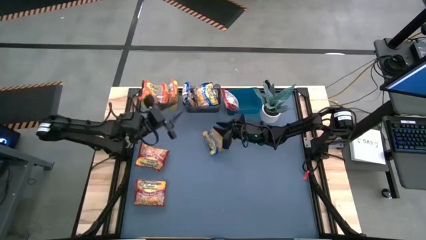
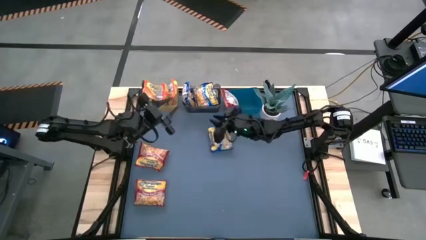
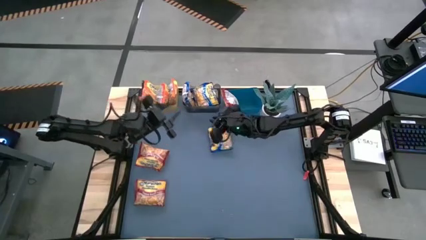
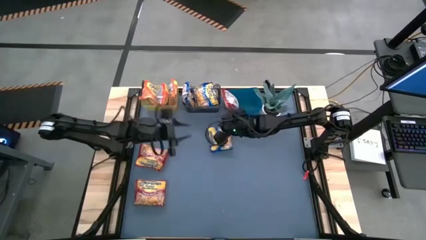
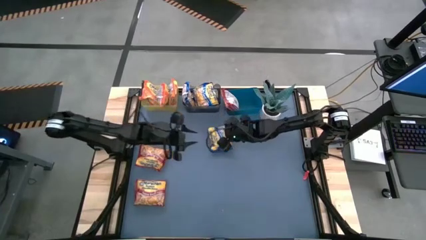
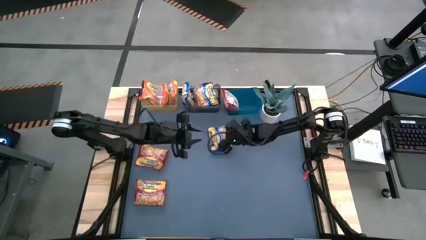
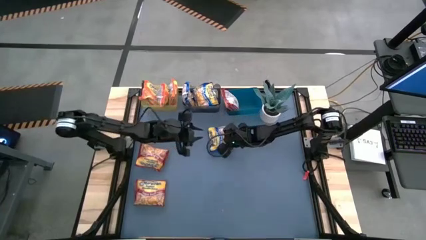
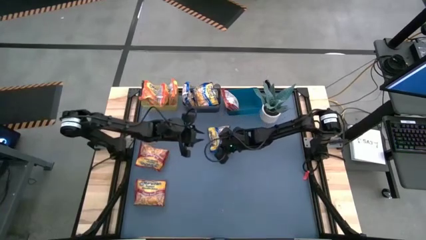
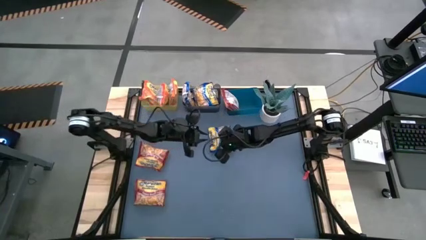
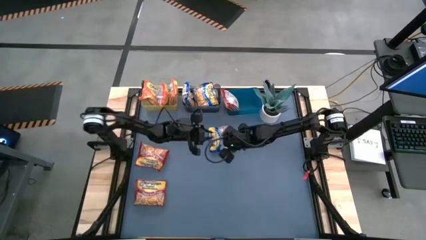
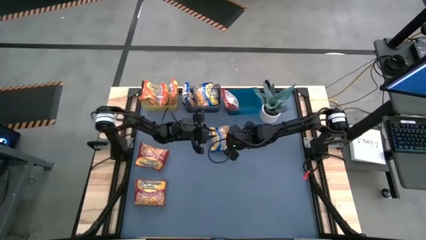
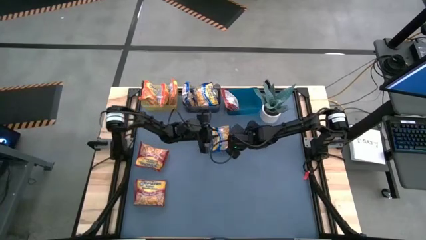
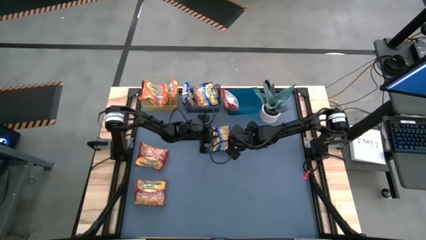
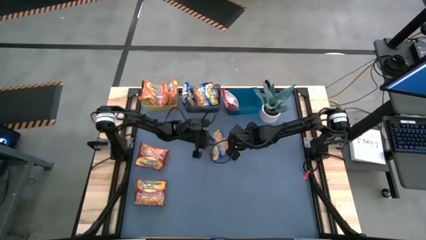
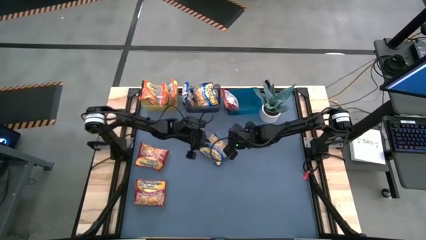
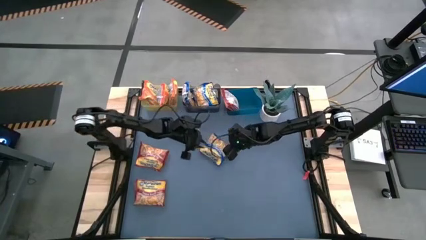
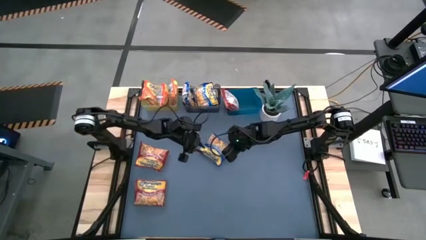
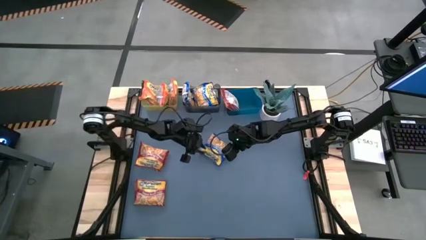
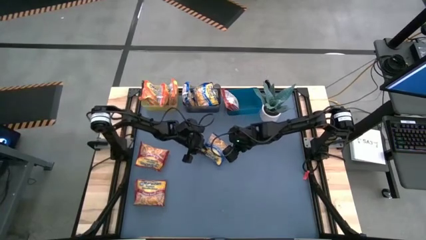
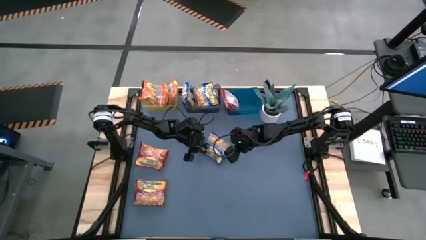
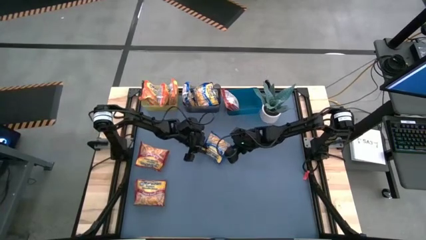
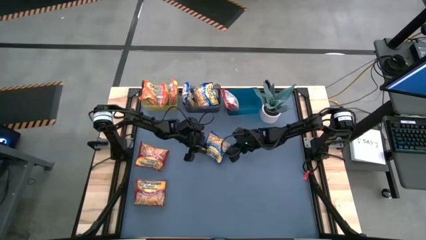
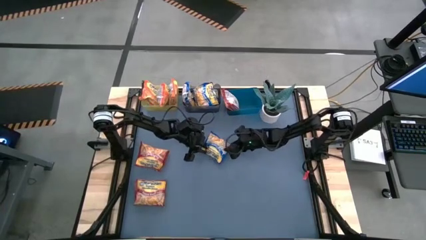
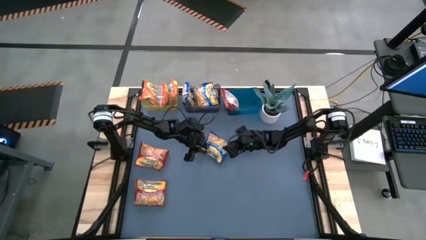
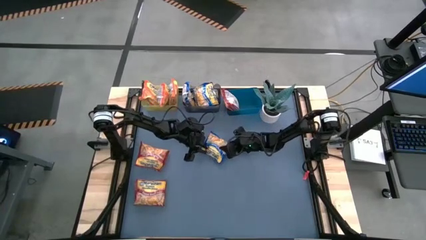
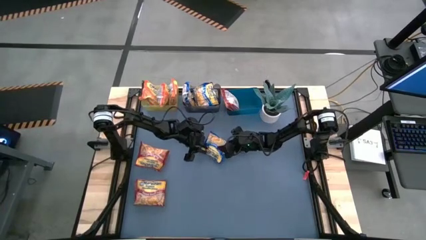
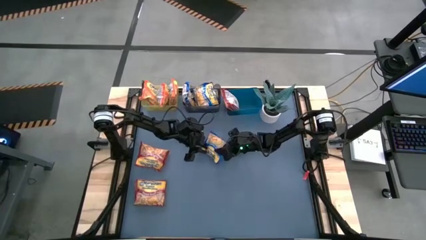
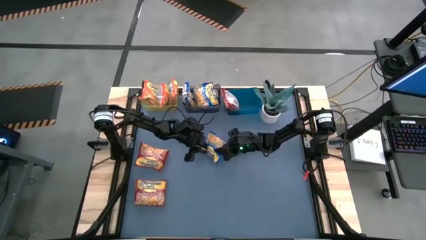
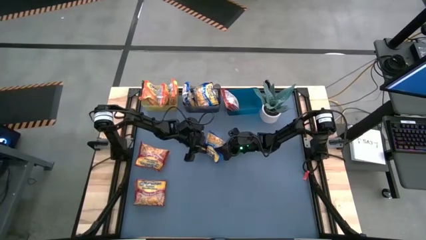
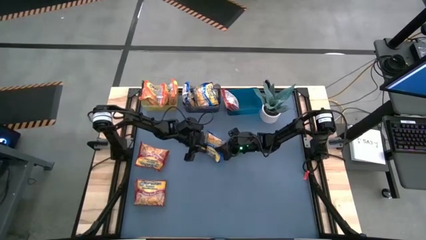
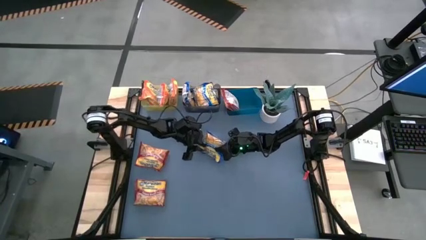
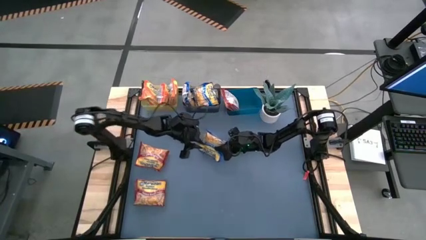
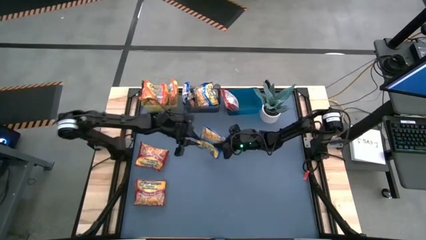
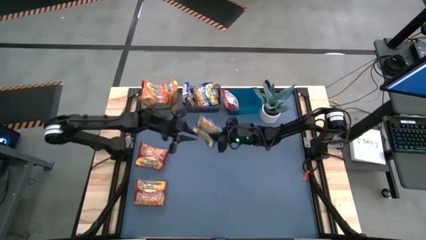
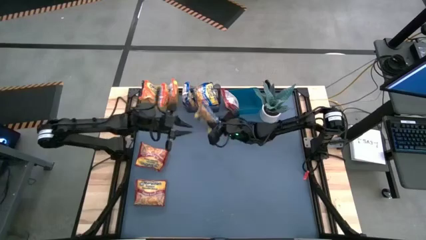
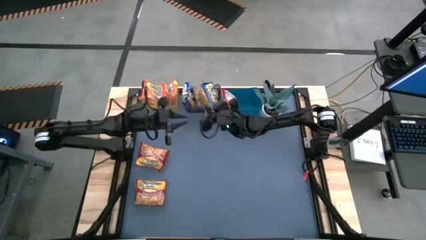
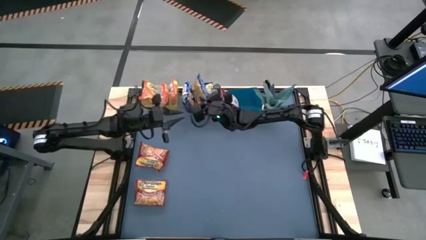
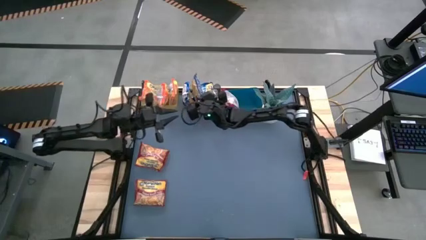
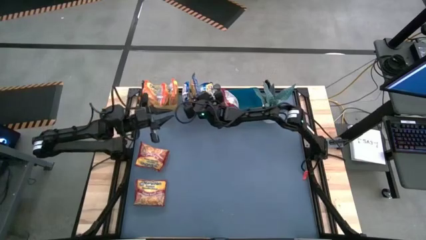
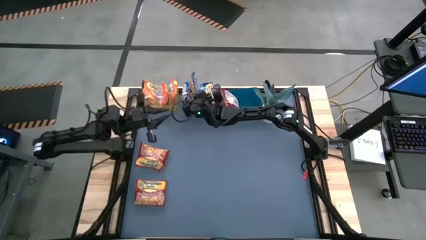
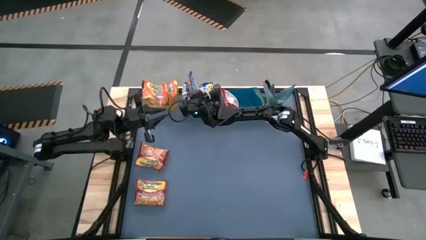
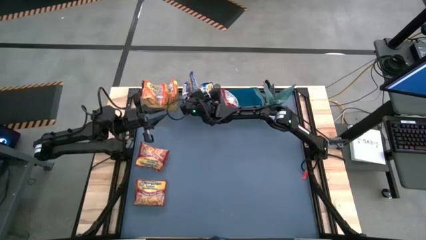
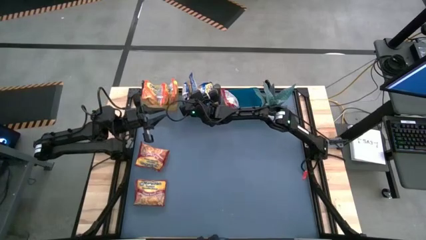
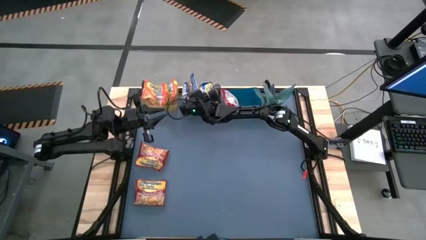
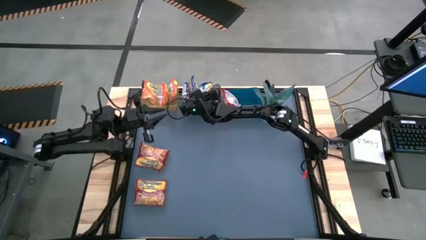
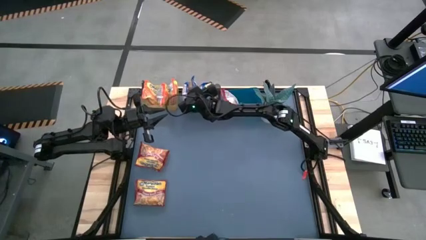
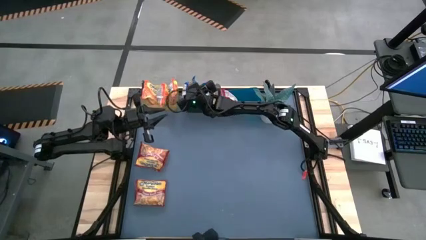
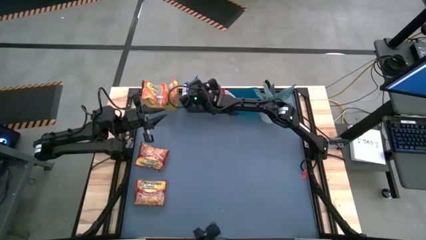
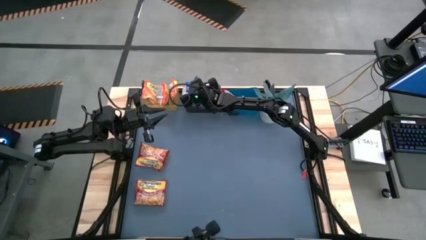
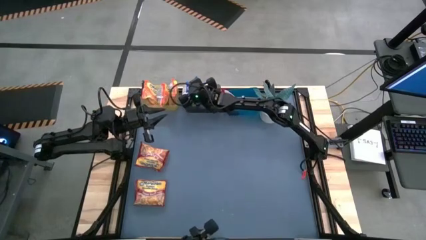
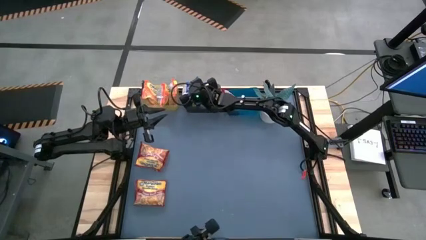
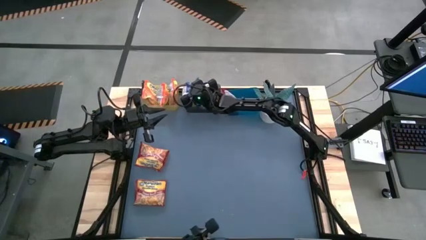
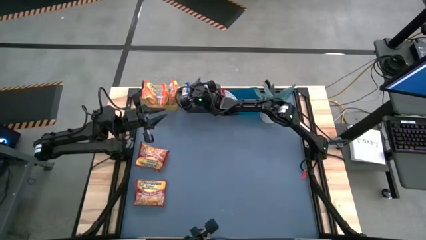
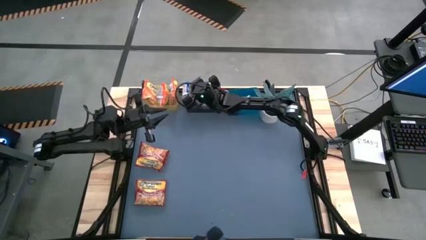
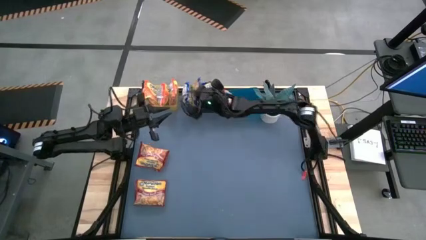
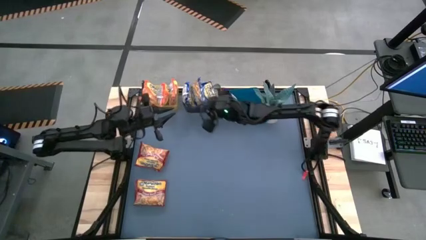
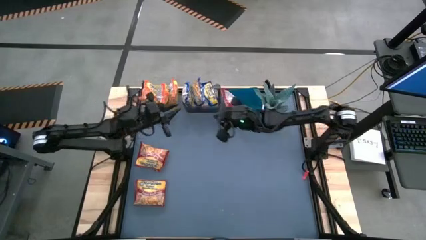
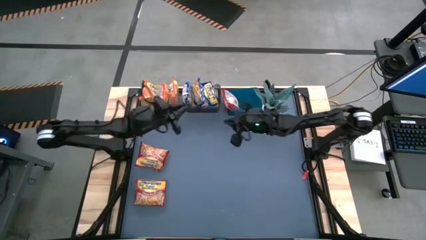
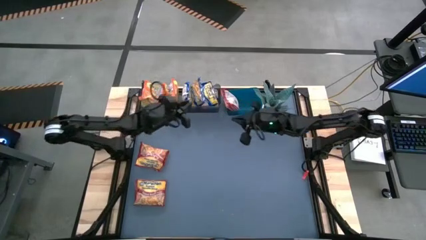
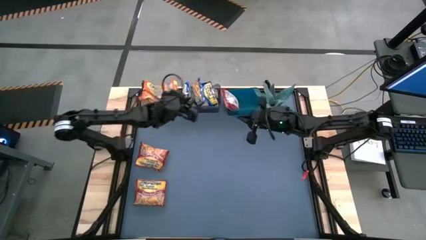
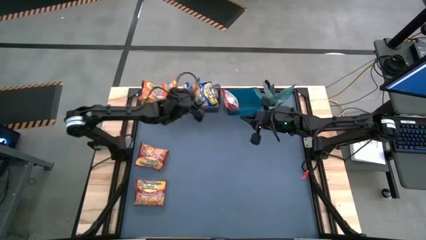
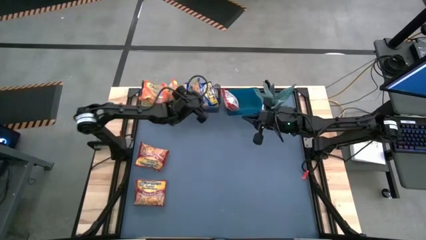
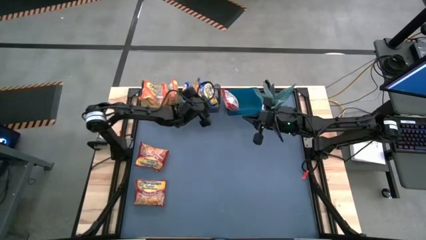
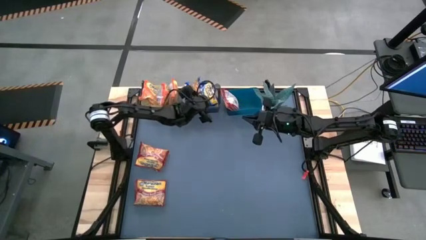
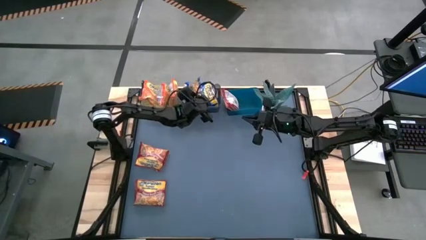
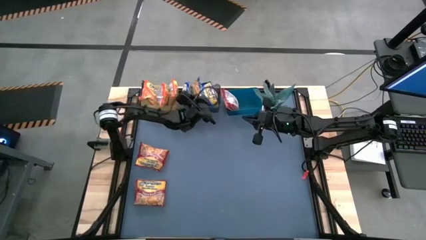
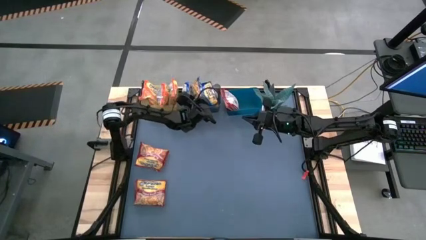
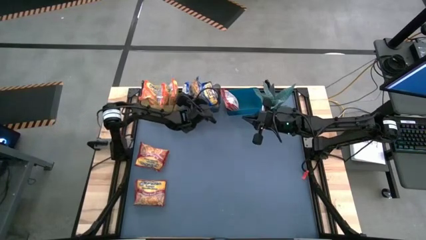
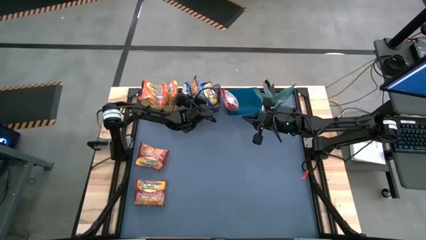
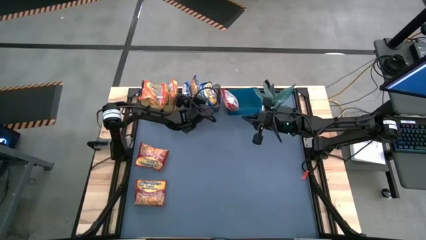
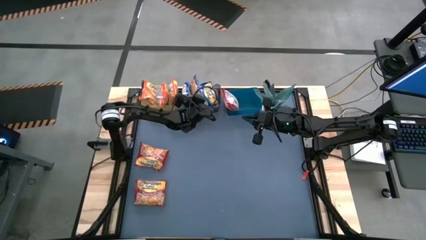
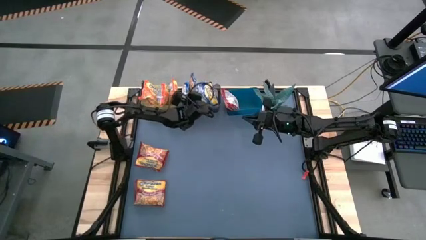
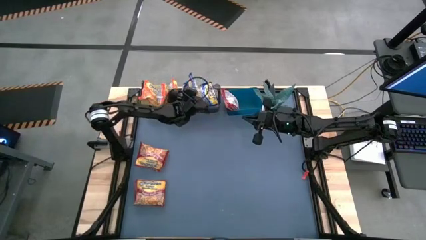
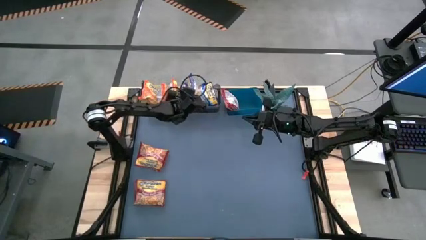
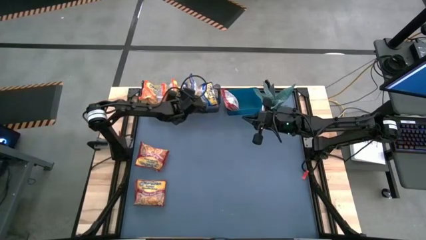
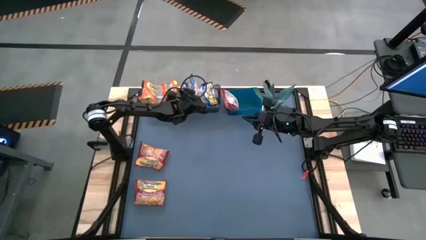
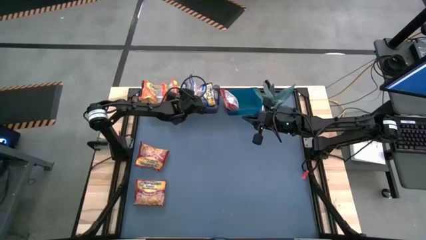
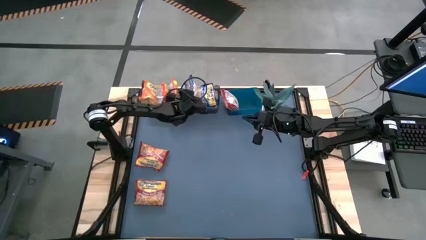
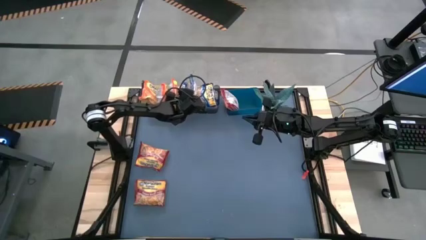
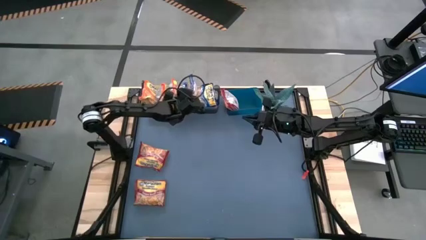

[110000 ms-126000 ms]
Task: Sort Maruchan noodles
Put the blue noodle pack into the black bin

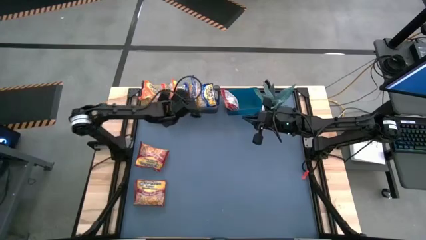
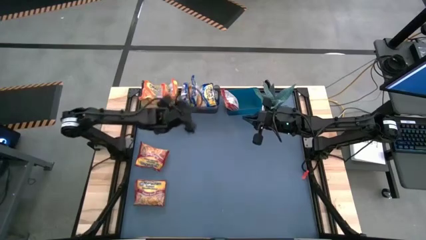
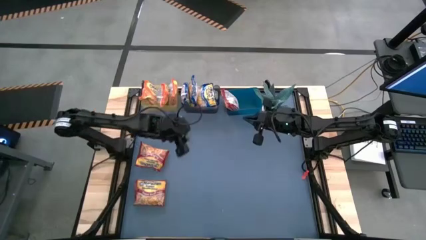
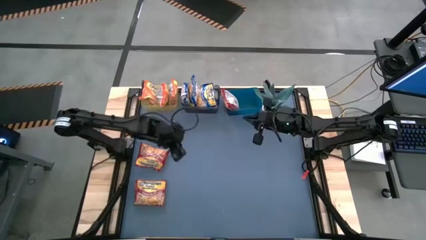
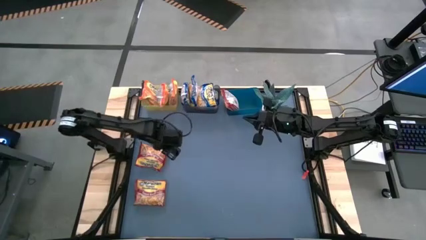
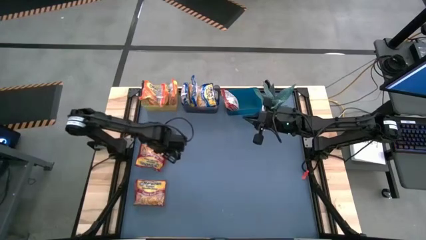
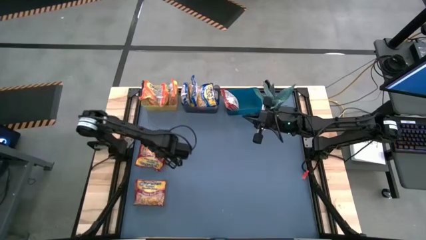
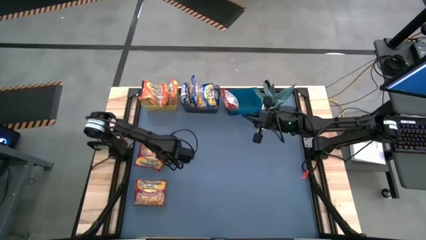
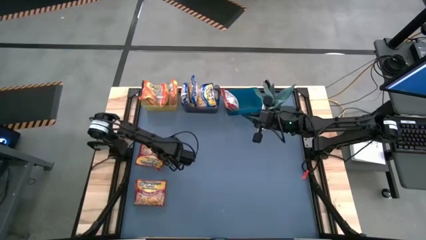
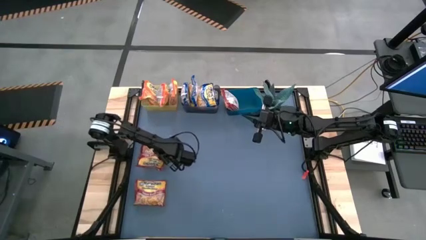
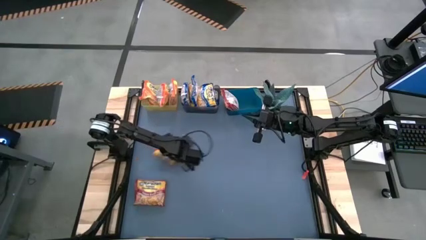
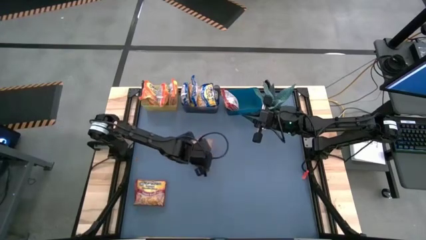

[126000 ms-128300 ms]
Put the red noodle pack into the blue bin
